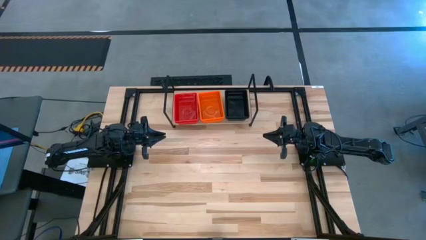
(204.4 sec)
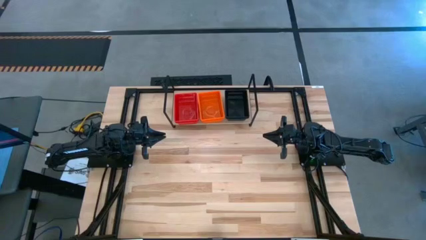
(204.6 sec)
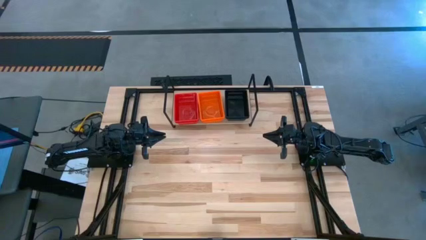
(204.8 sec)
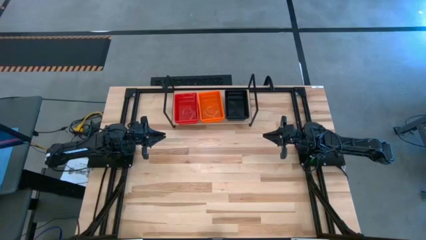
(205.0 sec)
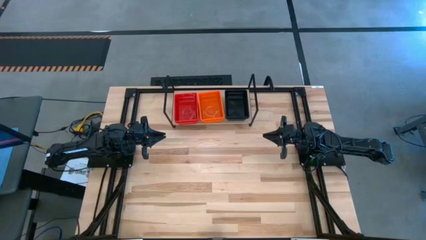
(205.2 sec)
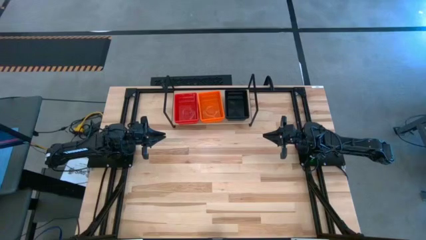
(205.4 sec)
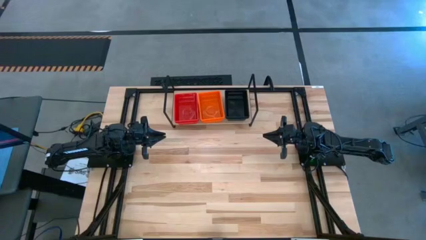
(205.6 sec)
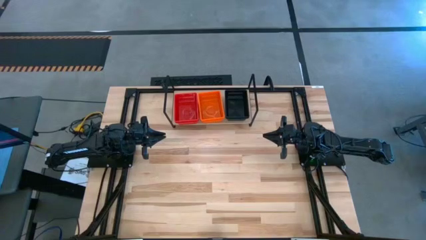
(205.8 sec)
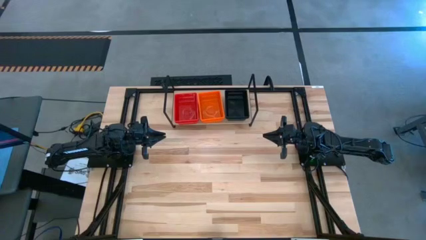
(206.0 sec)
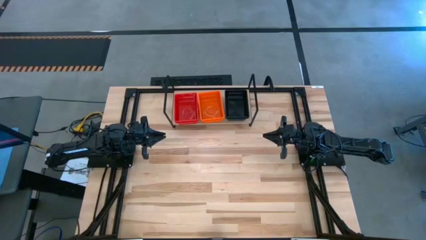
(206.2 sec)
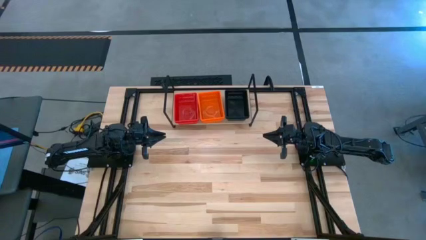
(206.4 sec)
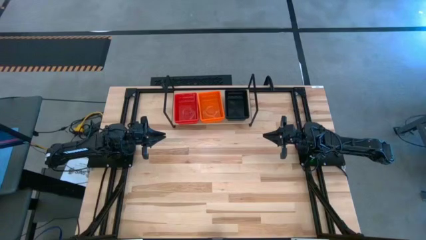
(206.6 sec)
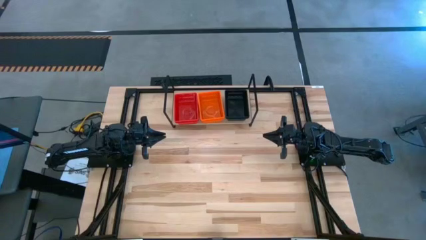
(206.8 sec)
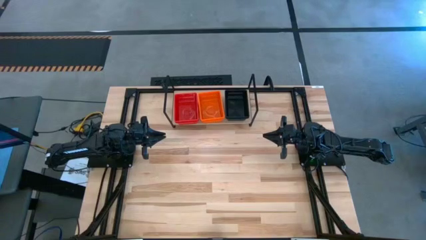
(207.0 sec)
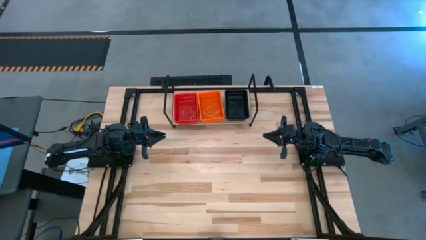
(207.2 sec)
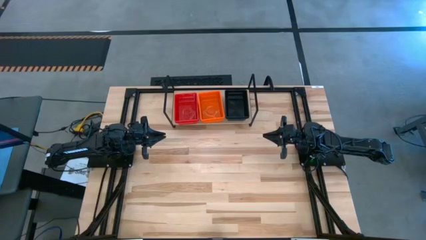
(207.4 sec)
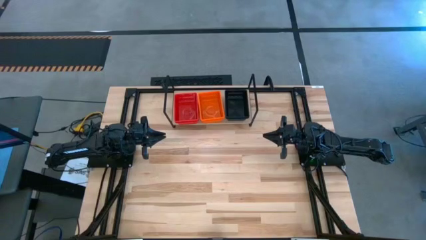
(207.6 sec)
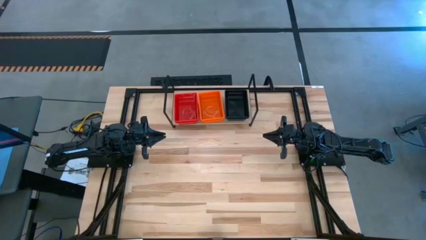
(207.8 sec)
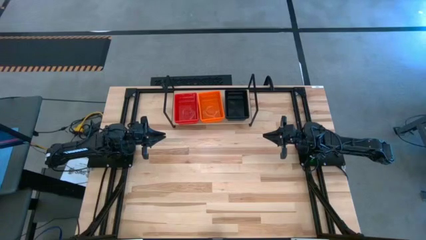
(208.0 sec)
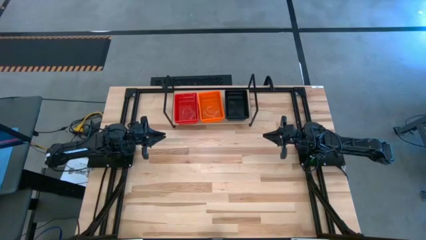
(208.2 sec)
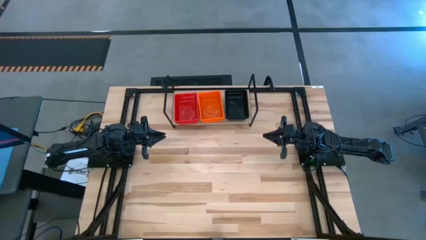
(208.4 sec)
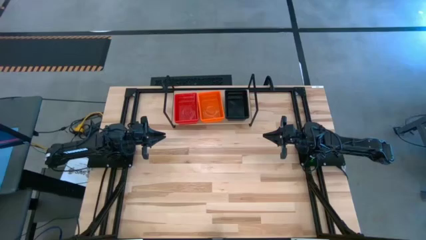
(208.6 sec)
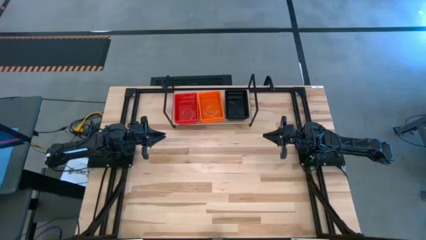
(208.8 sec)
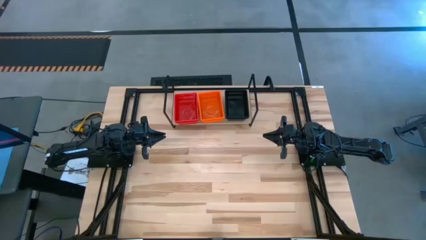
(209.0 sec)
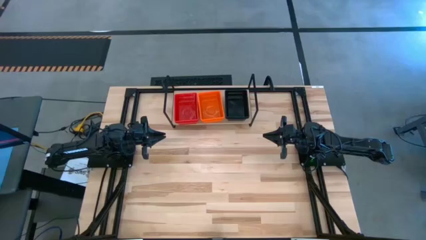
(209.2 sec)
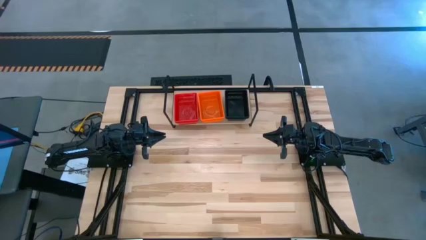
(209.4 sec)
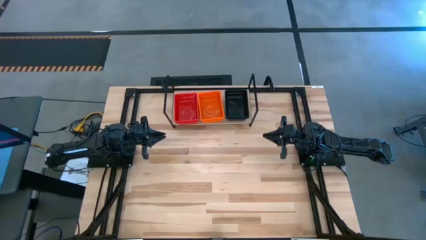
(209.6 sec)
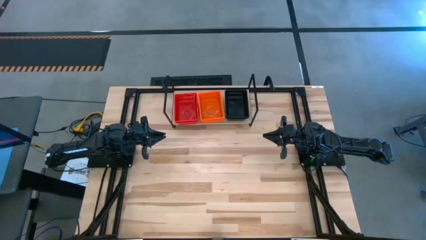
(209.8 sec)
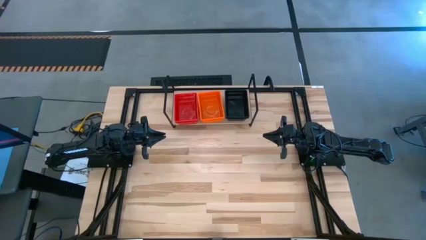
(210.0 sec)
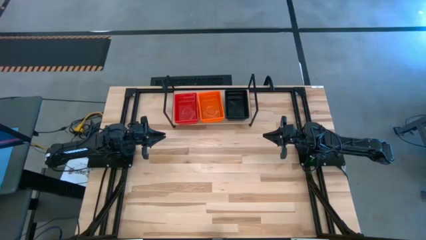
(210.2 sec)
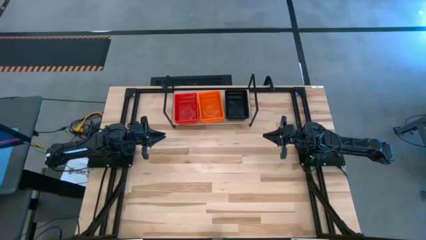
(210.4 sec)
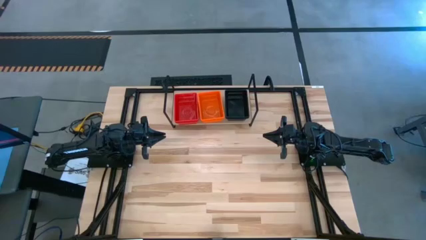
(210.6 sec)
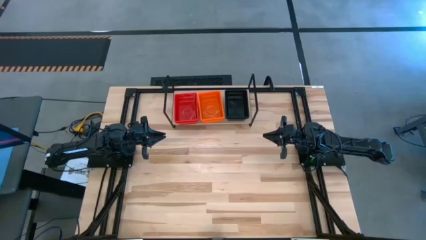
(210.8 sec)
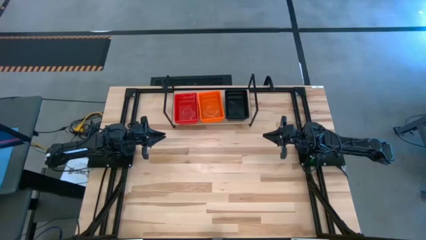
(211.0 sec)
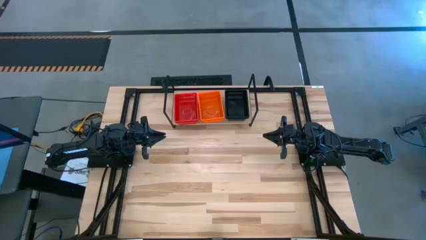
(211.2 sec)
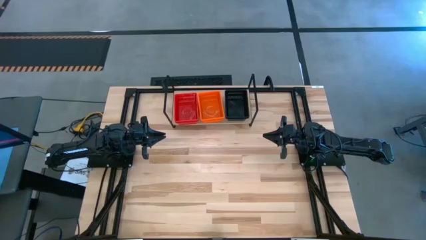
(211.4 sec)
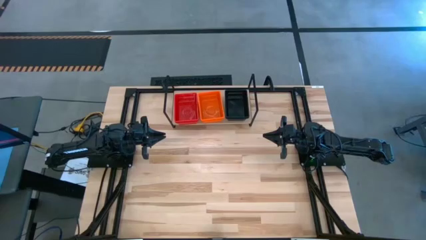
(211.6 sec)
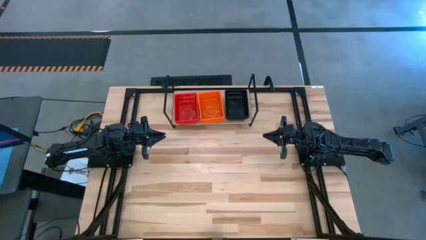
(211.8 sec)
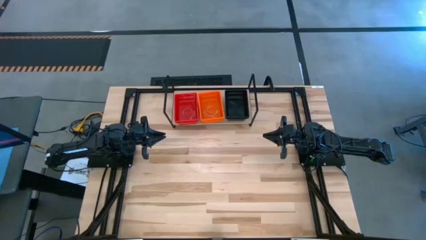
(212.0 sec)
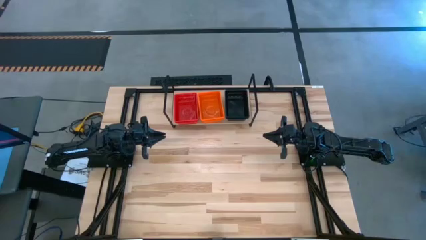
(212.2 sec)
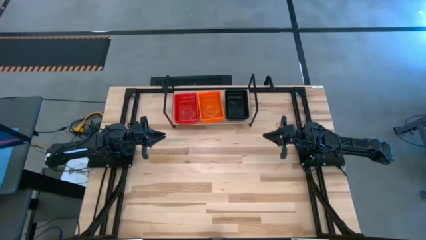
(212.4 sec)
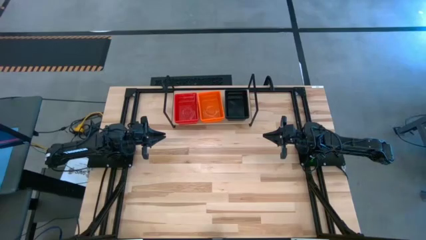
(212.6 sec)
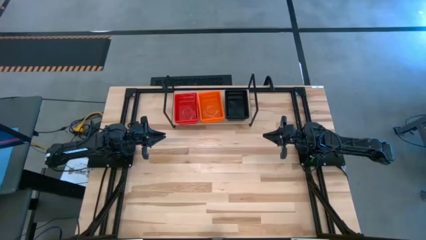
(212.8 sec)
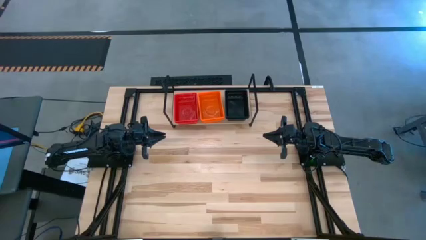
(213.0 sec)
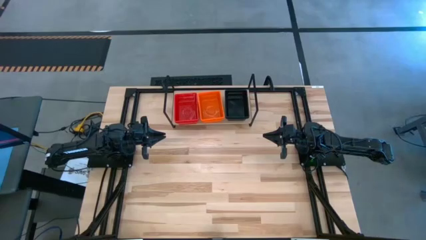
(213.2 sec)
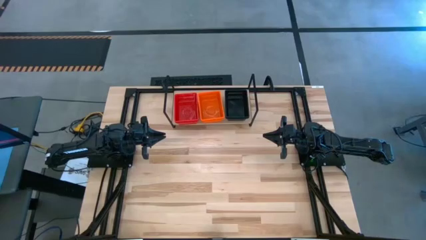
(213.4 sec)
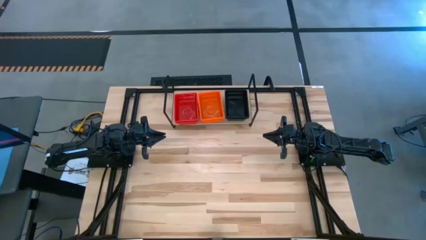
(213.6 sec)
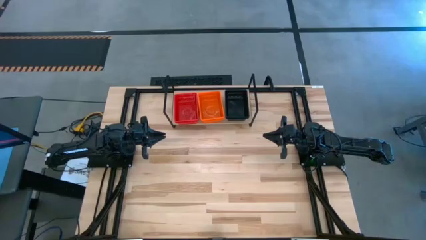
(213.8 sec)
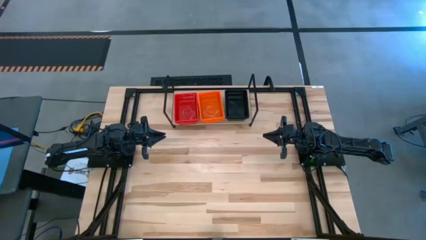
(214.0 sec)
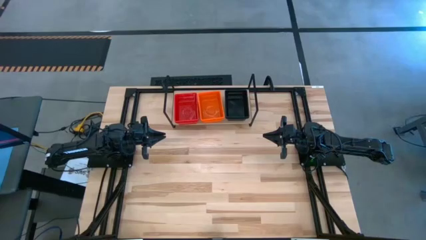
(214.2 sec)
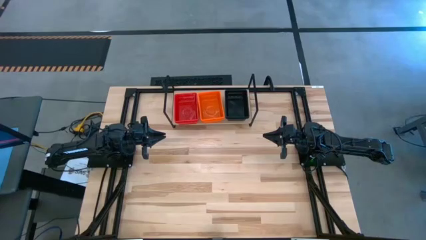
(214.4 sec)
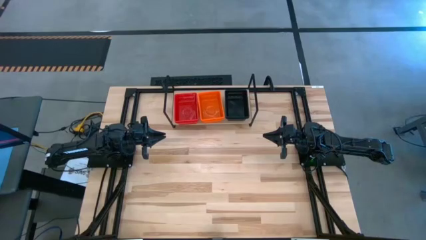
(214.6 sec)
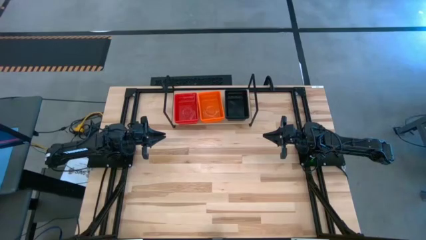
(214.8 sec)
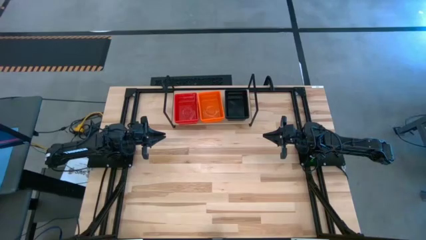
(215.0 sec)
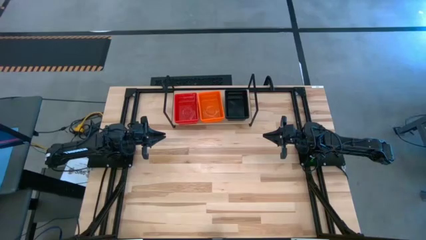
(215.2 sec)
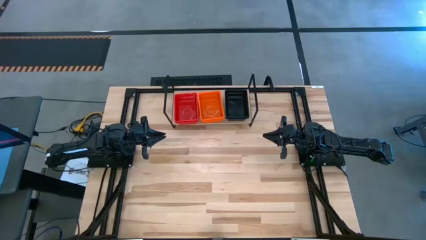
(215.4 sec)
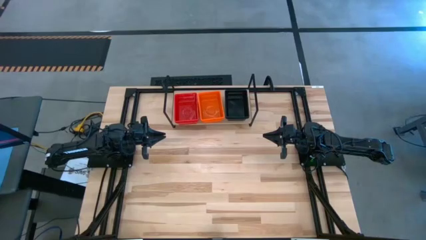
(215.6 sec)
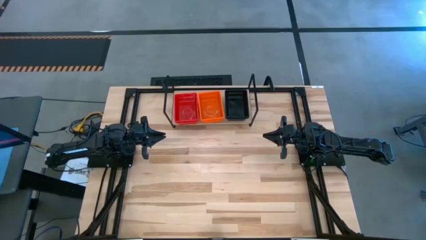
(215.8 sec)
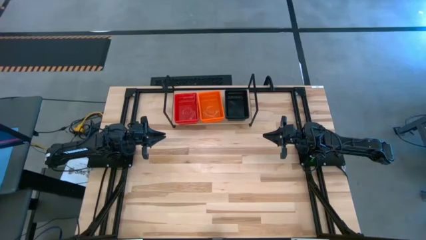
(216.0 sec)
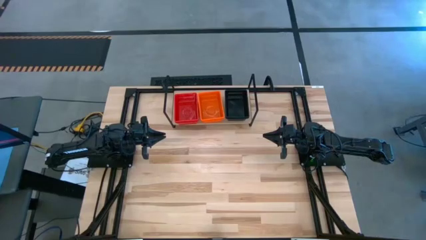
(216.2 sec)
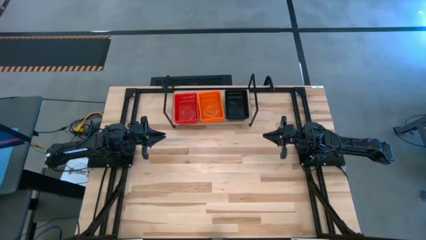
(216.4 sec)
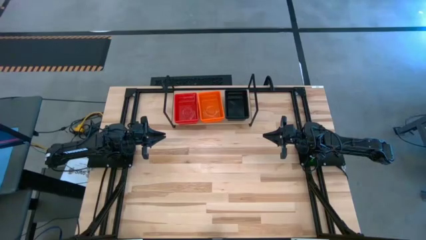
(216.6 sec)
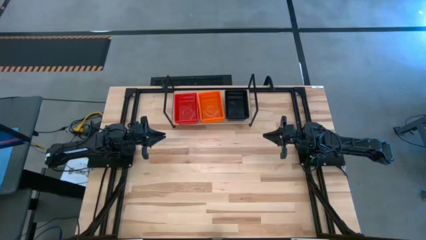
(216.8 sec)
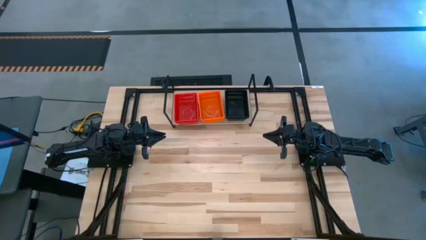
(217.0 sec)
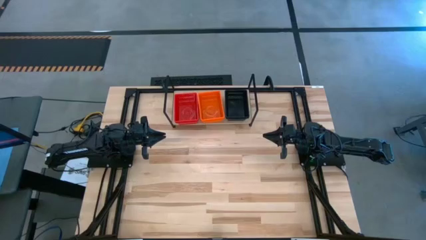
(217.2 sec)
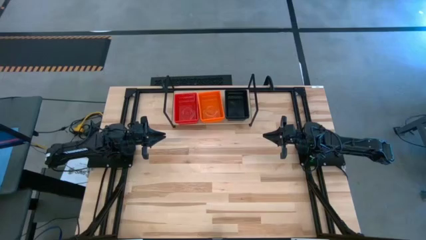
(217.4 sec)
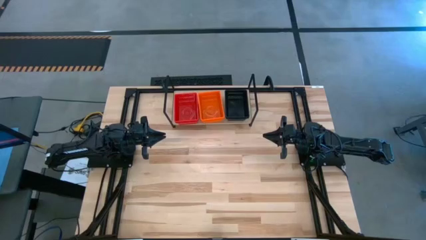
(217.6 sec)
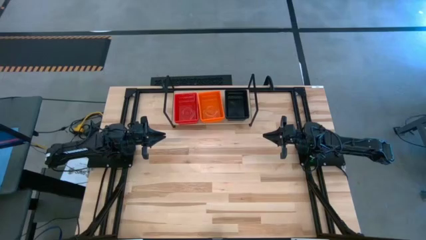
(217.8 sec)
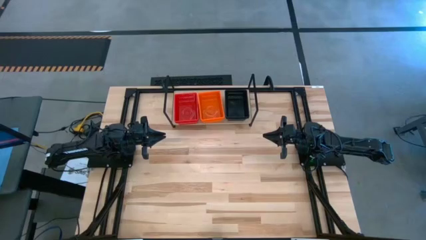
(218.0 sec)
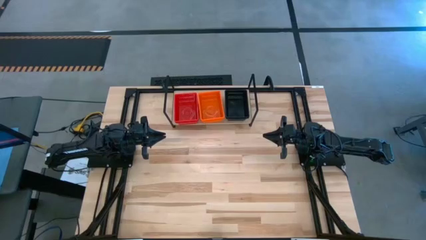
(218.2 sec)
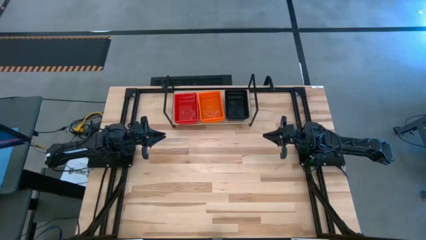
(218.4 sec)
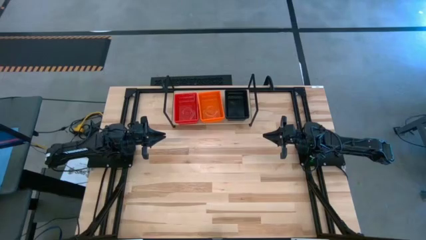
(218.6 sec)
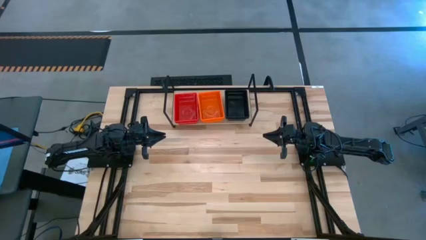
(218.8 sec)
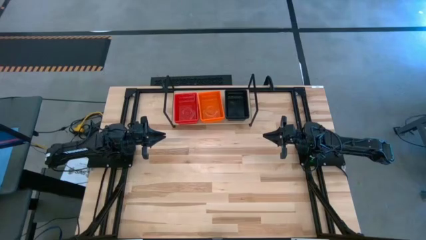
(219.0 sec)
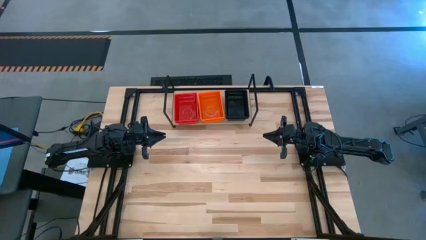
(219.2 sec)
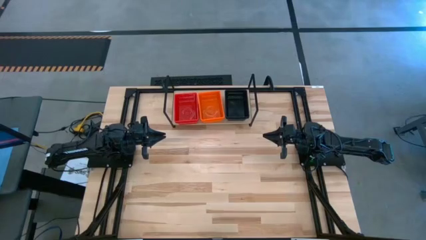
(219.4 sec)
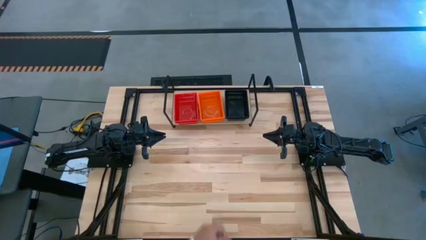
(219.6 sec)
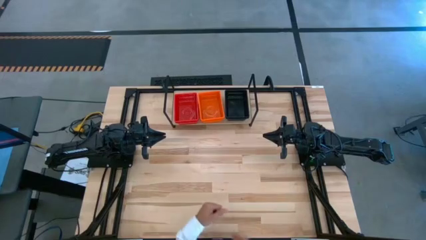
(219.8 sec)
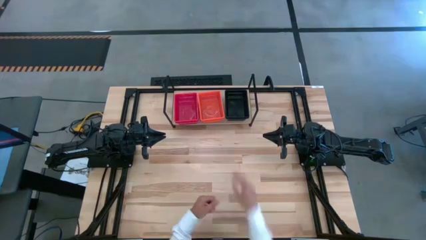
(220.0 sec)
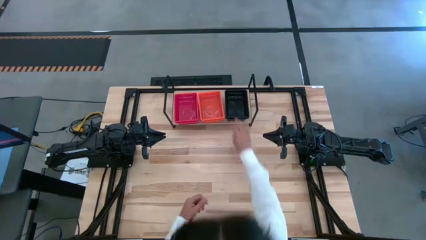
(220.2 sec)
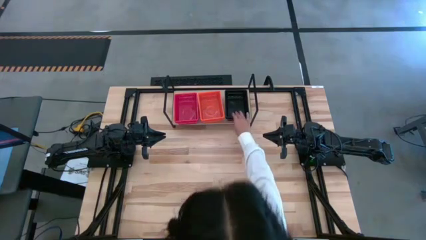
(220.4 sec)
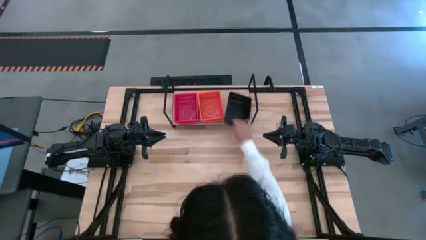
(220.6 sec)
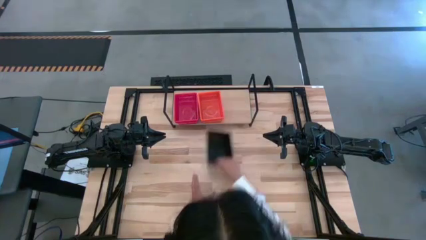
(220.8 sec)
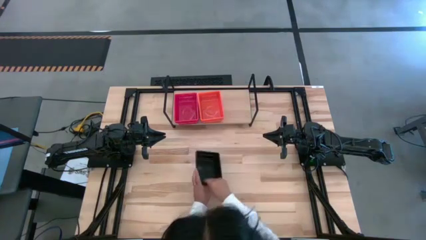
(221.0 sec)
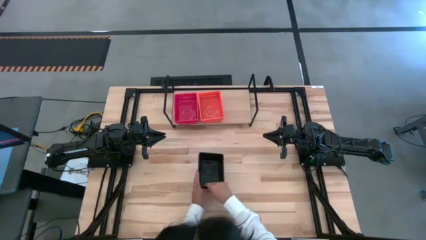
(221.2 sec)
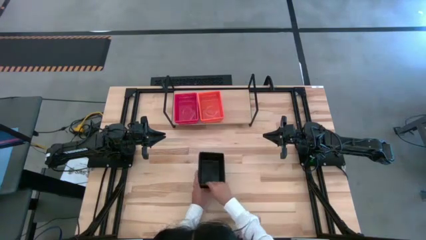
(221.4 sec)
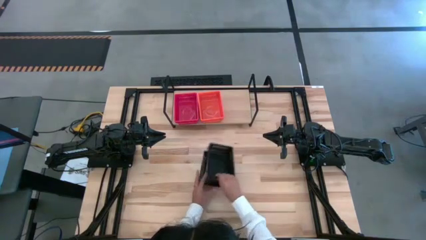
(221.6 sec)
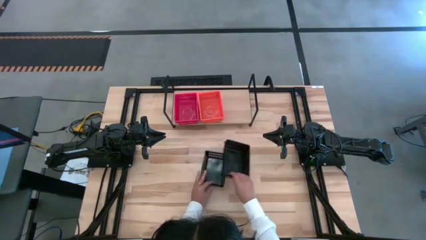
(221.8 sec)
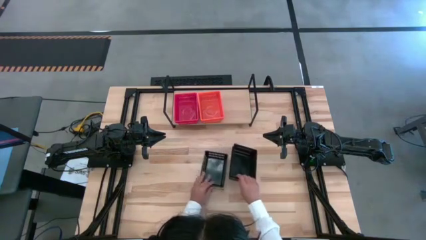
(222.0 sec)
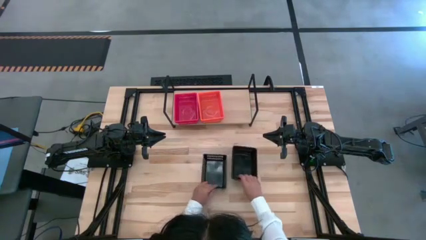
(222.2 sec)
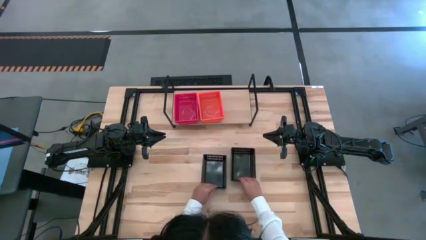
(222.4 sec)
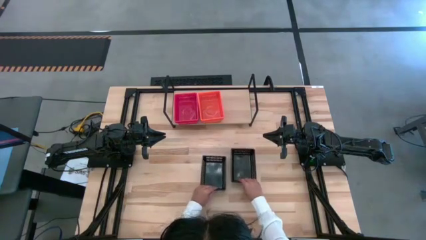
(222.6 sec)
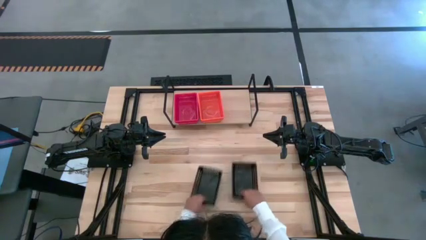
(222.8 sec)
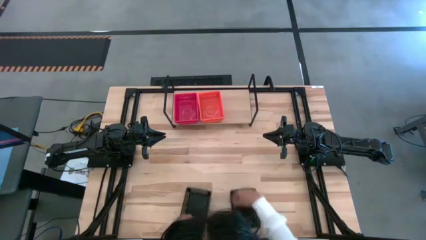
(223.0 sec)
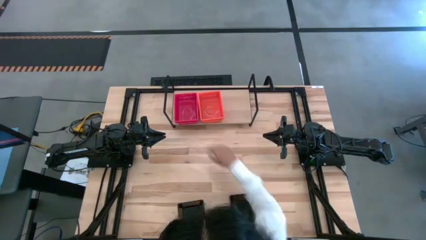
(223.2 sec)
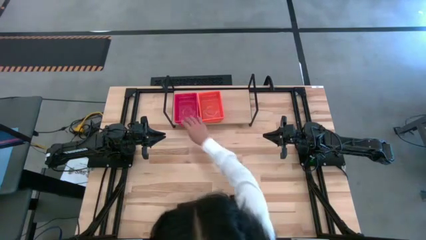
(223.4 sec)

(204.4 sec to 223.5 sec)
Task: Stack baskets on shelf by color
Return to Home Position
